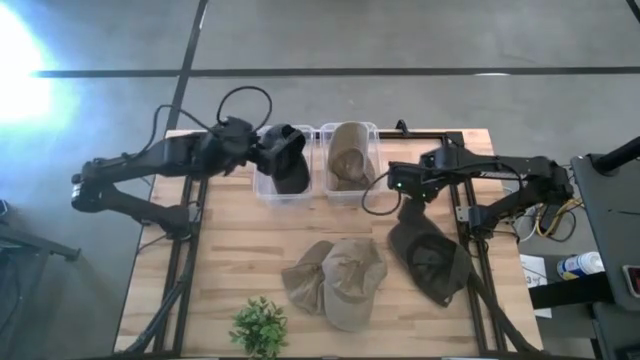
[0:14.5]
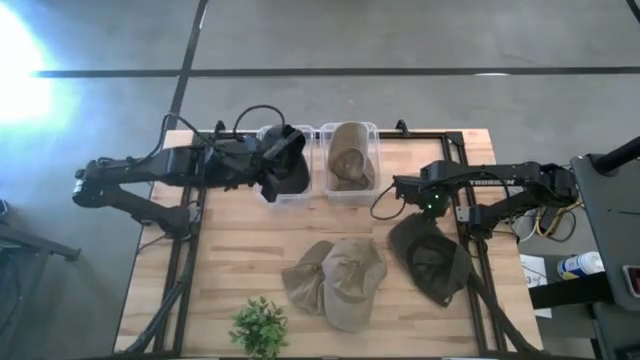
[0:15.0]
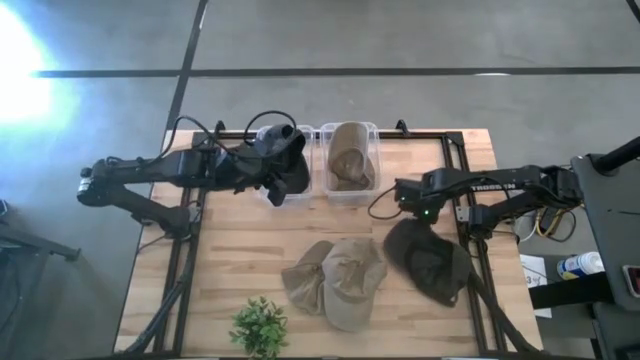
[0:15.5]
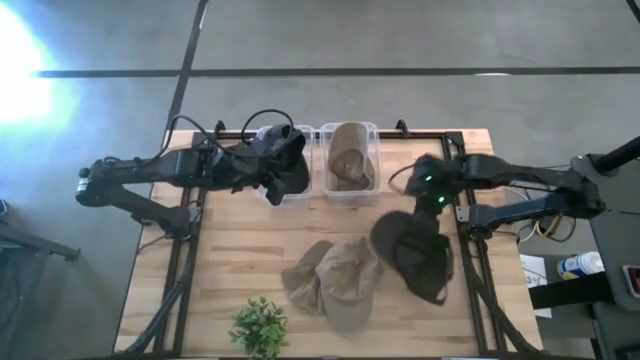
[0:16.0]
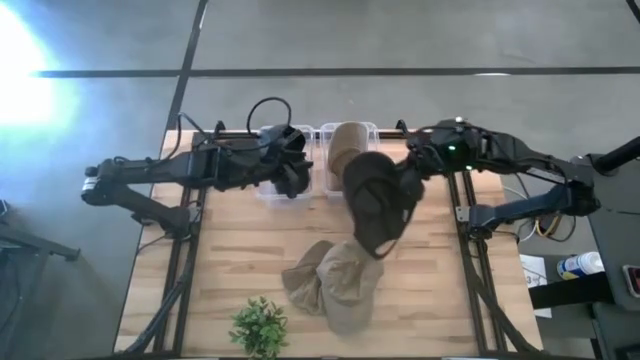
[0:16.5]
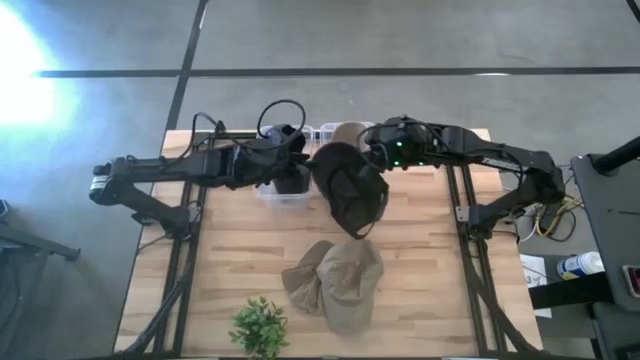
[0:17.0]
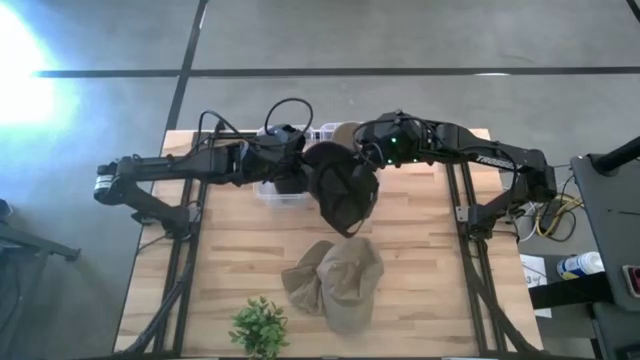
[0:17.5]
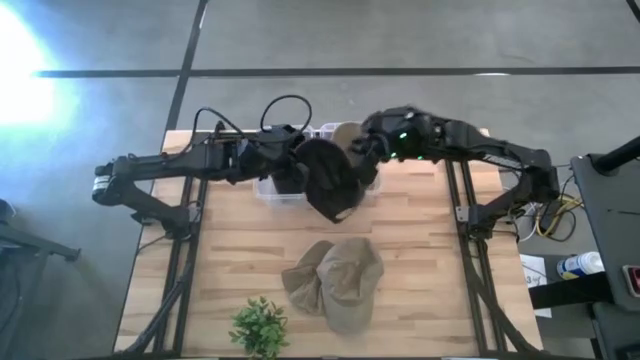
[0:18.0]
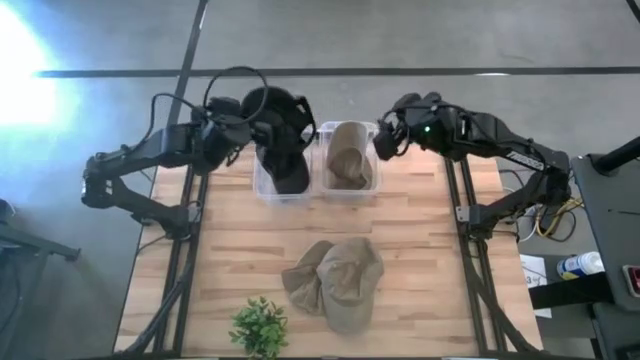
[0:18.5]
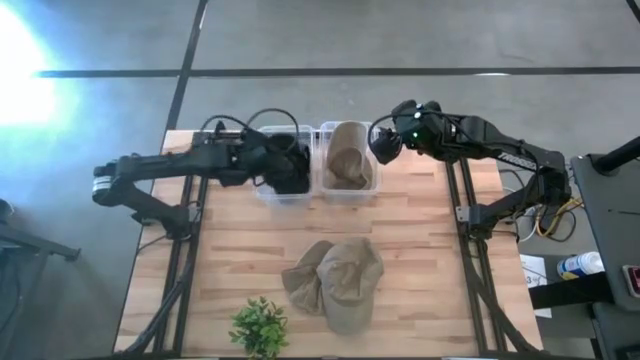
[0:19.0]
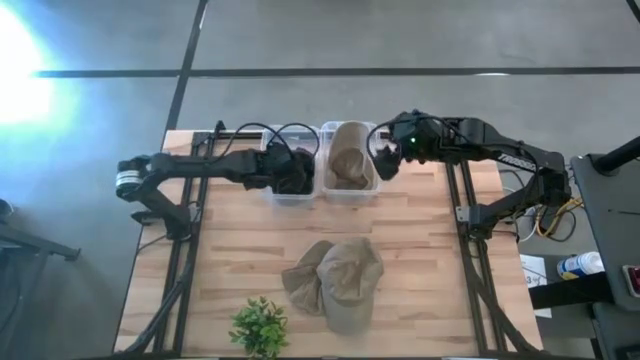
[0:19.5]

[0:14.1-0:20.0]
Task: Pick & Place hat
Put the black cap into the left transparent bin

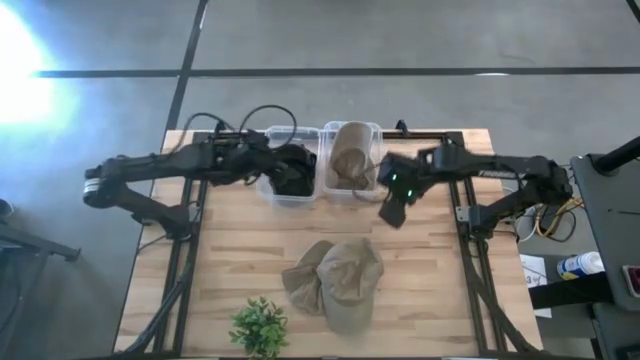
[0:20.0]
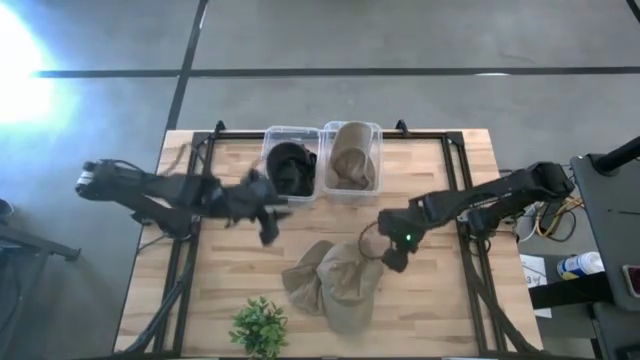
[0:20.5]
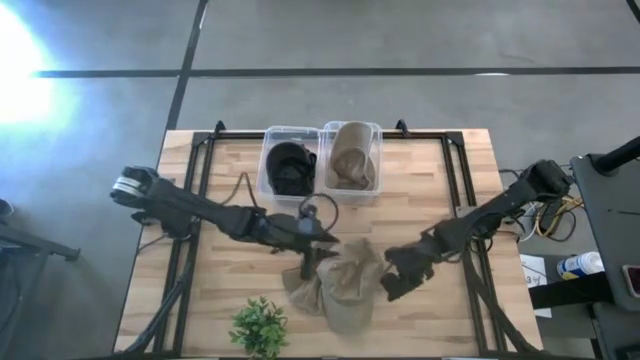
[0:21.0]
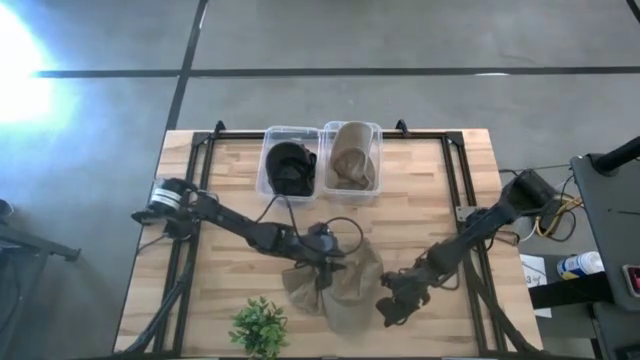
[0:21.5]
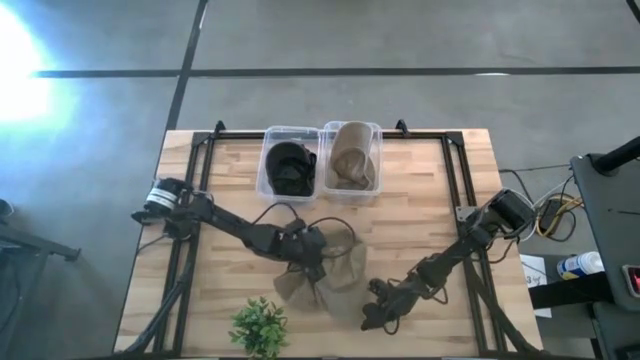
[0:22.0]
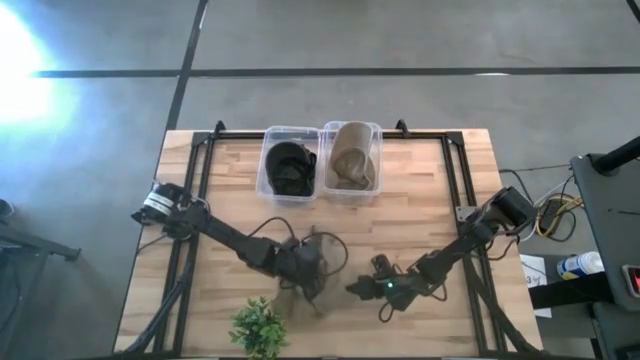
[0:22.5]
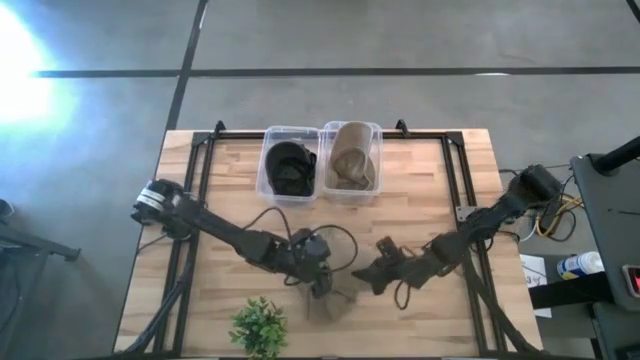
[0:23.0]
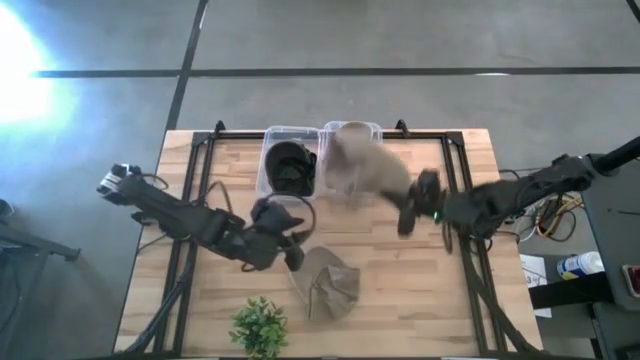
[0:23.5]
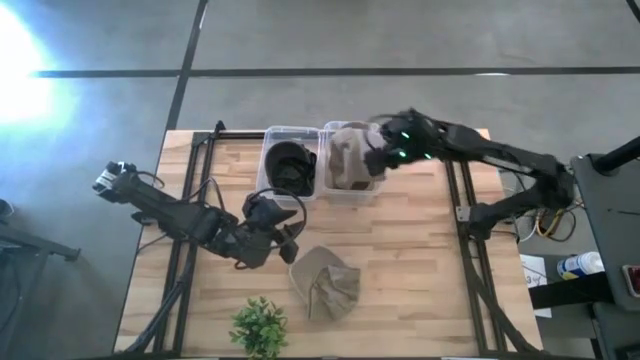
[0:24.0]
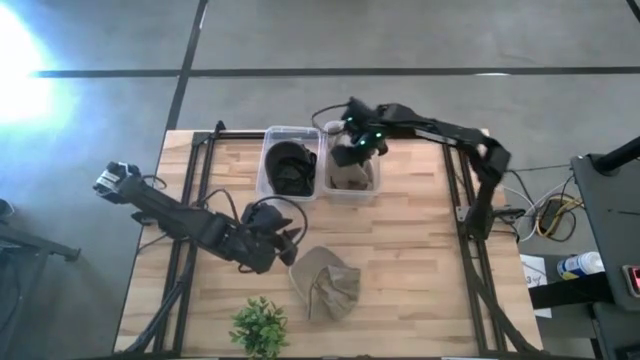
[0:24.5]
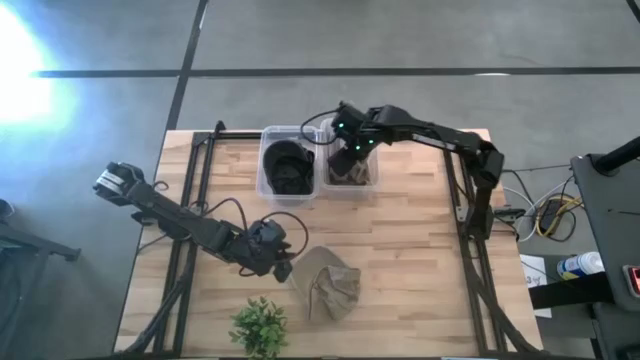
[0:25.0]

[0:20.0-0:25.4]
Put the right brown cap into the right transparent bin

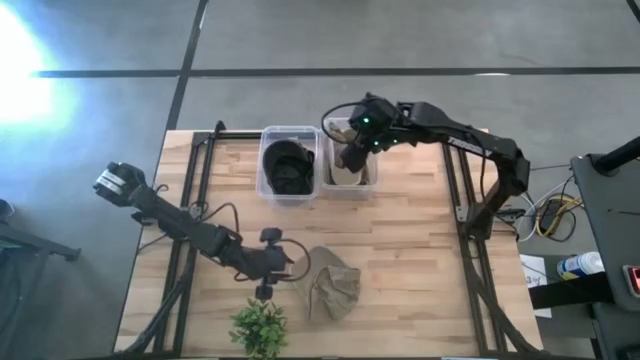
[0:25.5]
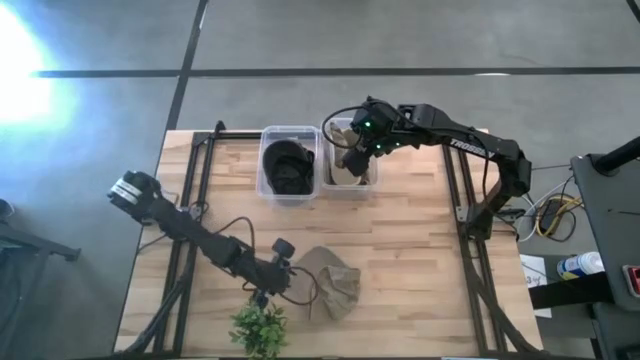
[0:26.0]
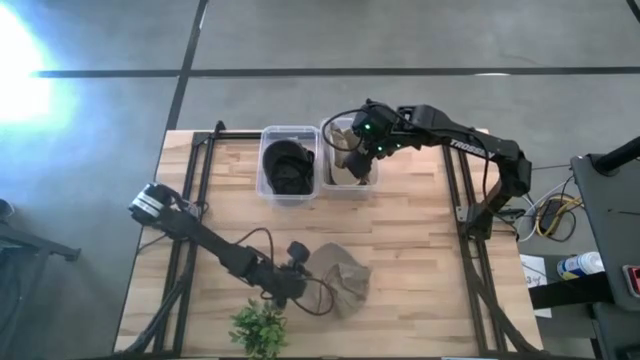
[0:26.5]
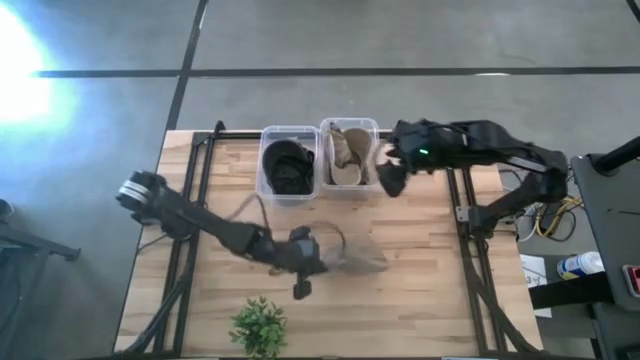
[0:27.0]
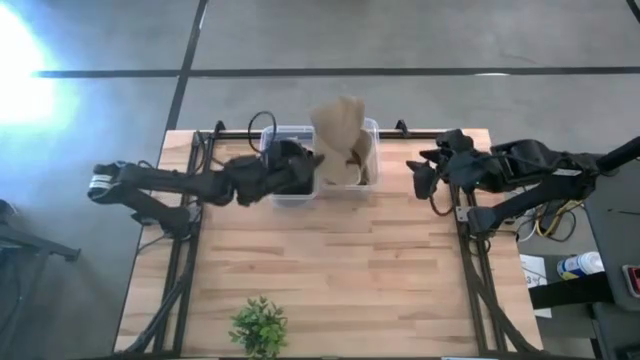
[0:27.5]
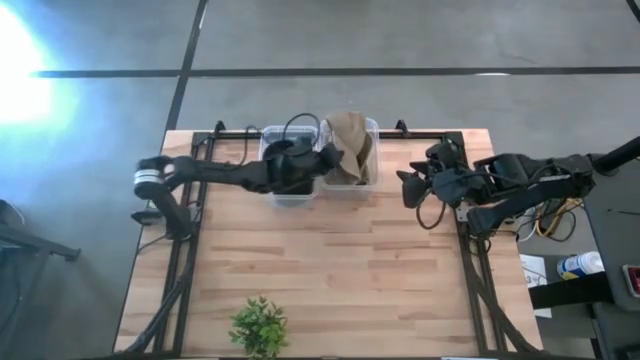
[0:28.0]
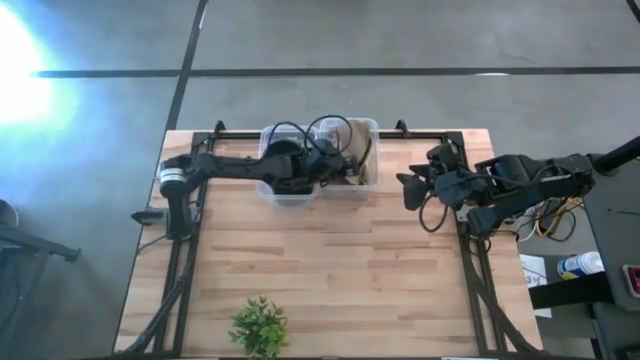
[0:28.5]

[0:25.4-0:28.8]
Put the brown cap into the right transparent bin

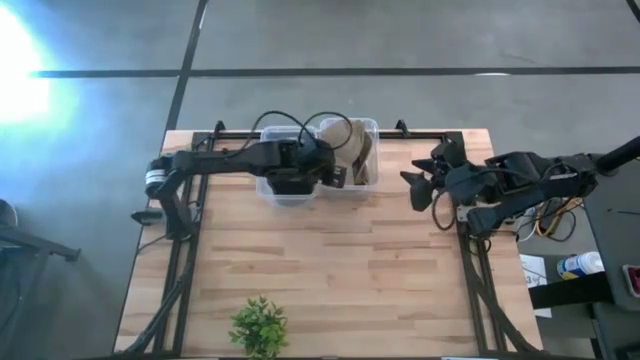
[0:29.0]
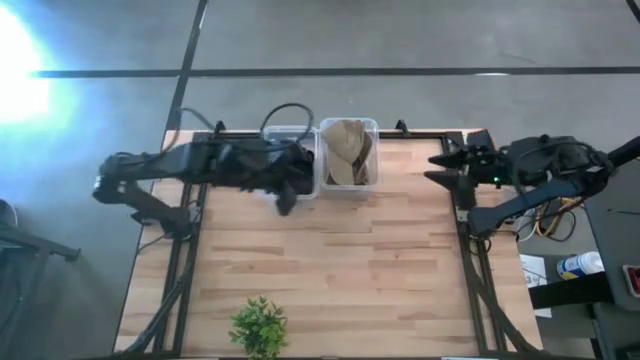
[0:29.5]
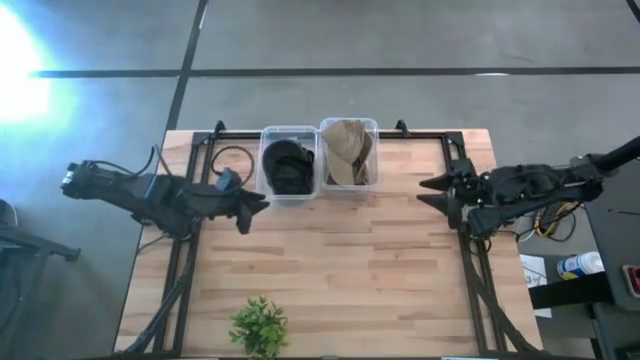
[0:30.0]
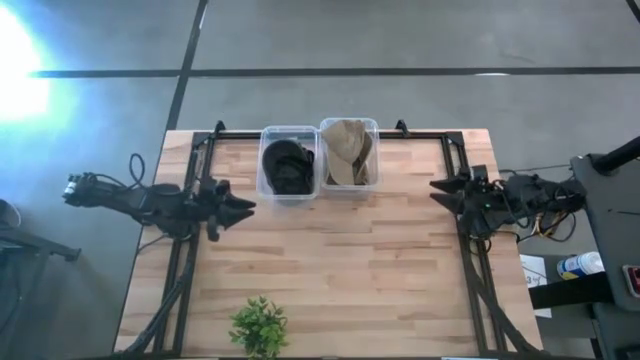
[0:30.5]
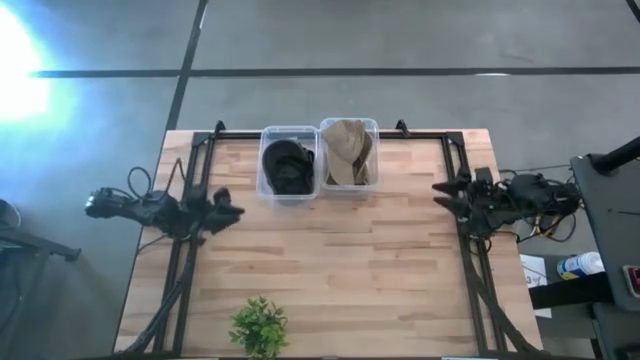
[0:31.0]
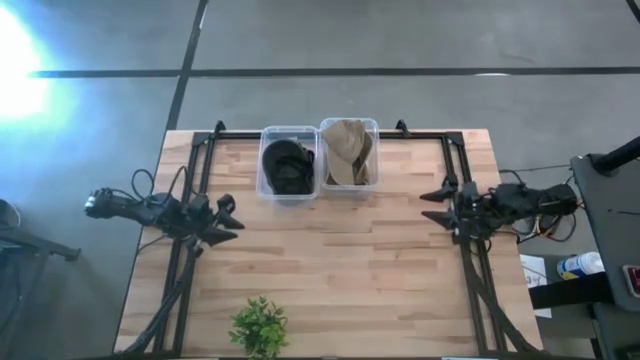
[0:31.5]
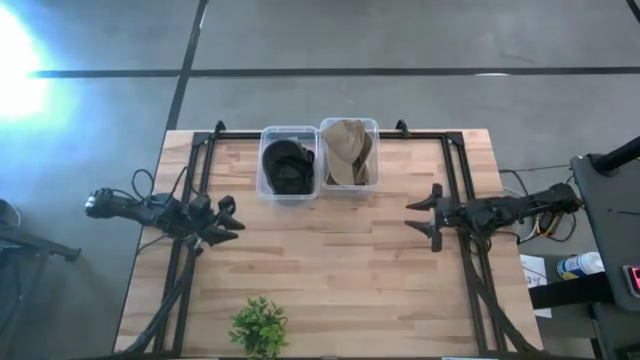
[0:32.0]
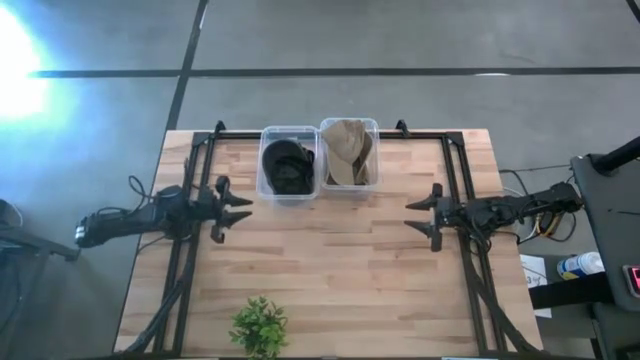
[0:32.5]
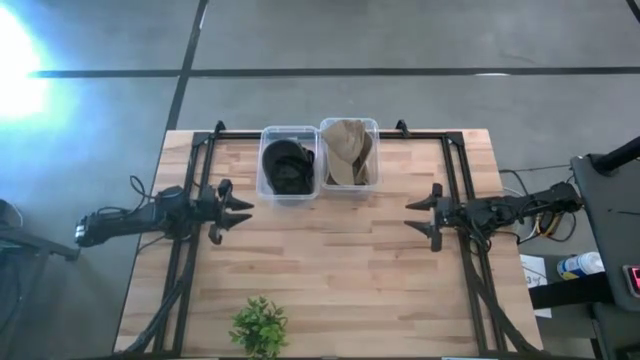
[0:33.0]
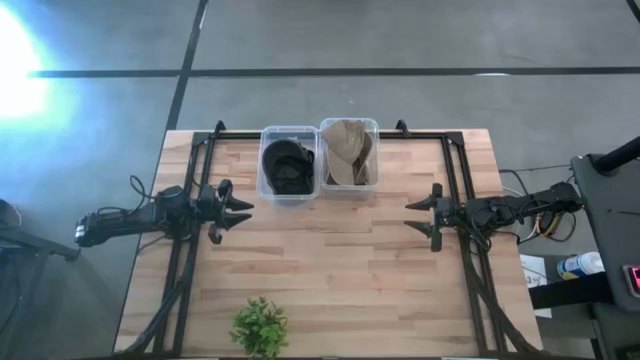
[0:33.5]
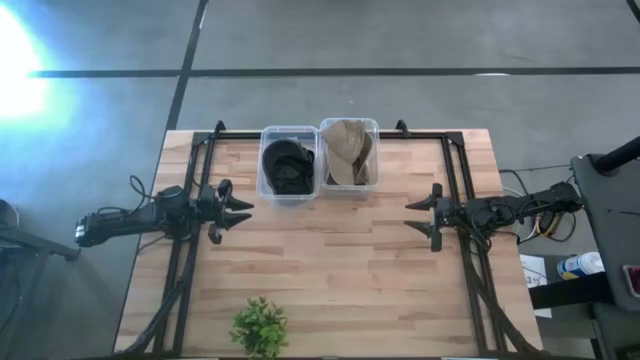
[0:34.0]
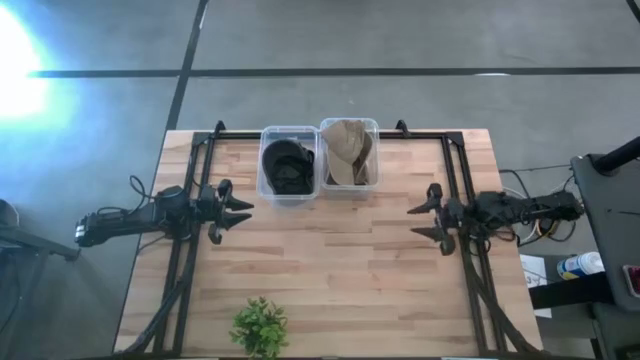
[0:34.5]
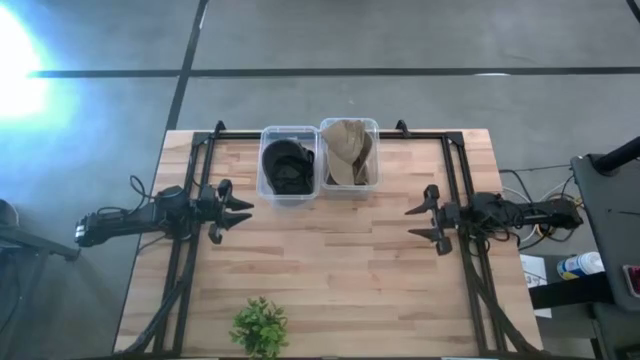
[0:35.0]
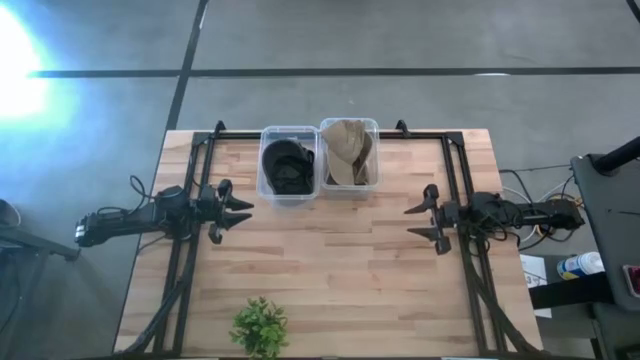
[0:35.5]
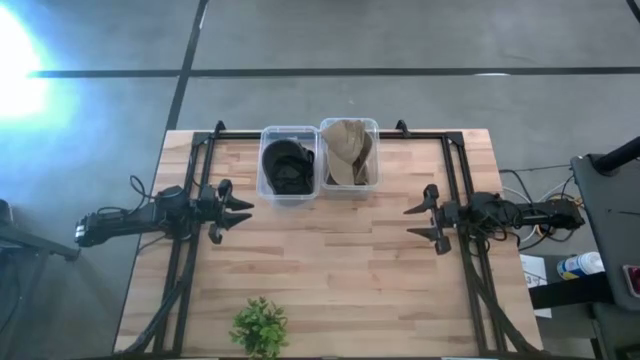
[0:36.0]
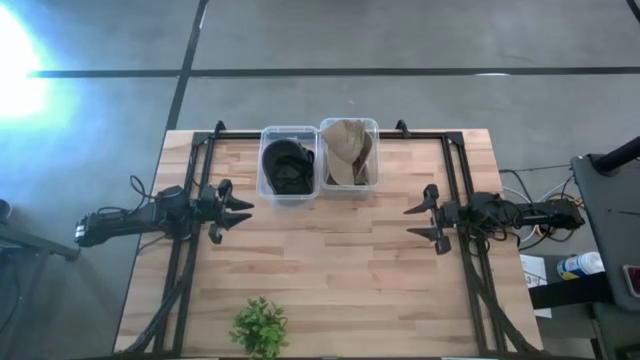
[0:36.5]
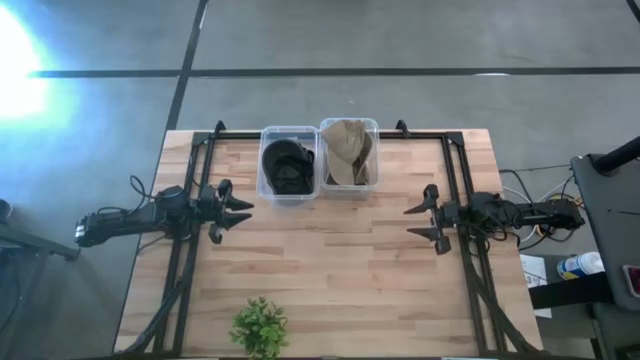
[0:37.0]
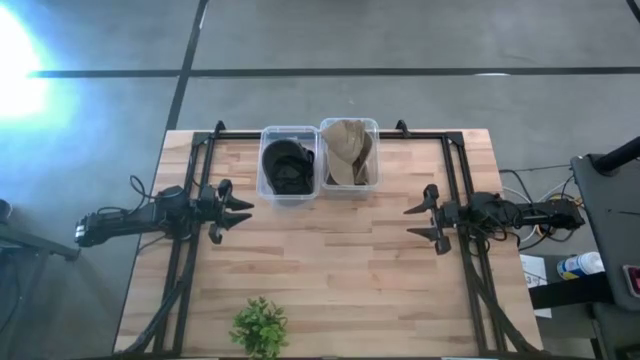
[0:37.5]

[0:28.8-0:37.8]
Return to Home Position
